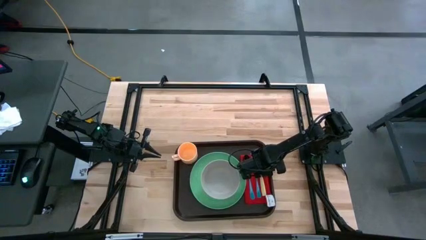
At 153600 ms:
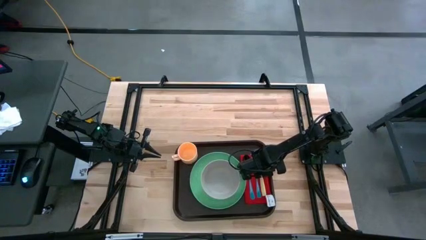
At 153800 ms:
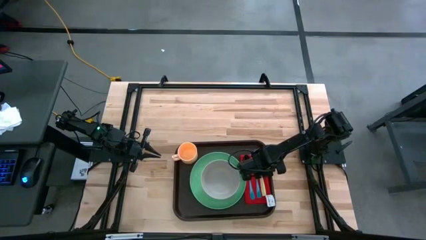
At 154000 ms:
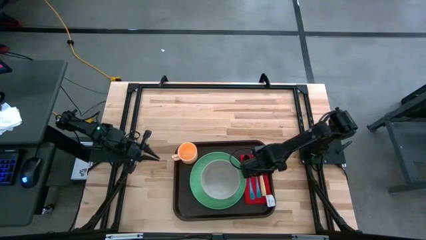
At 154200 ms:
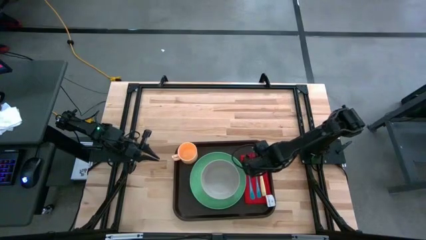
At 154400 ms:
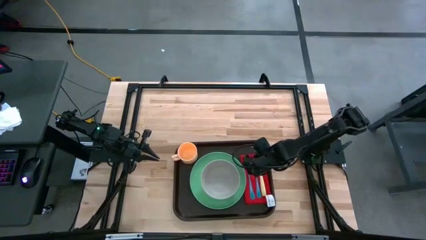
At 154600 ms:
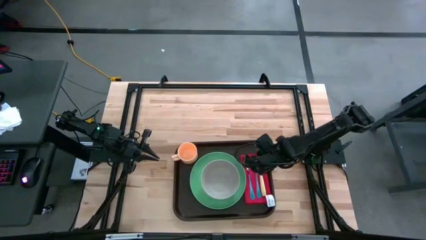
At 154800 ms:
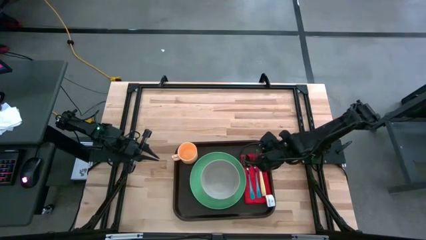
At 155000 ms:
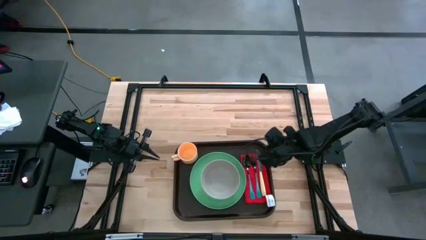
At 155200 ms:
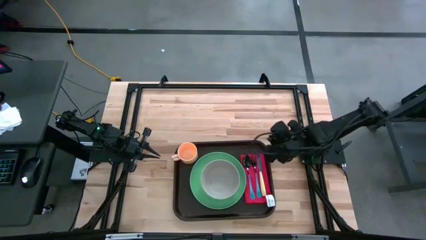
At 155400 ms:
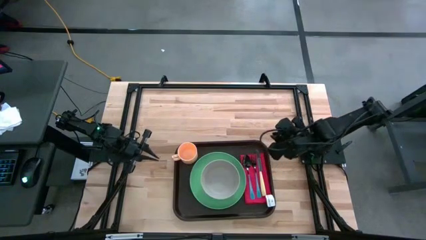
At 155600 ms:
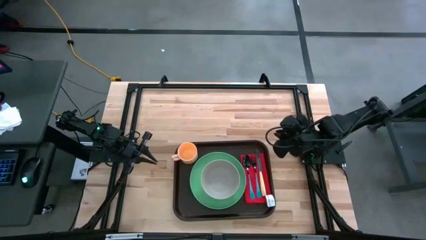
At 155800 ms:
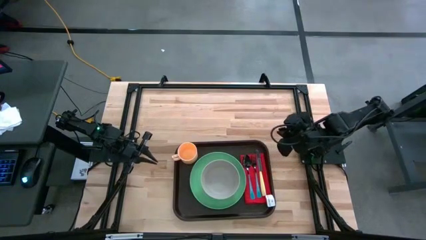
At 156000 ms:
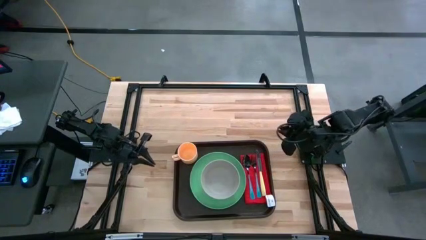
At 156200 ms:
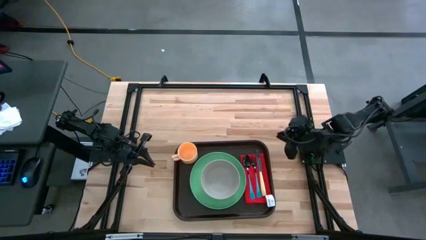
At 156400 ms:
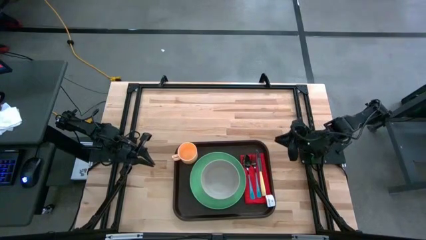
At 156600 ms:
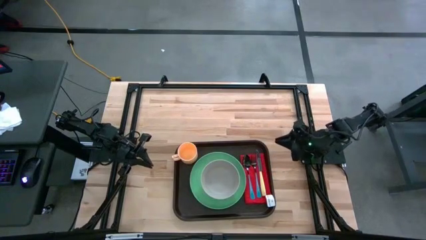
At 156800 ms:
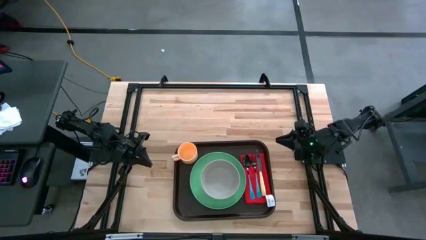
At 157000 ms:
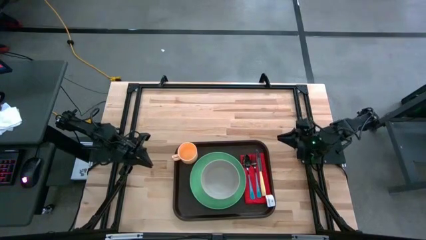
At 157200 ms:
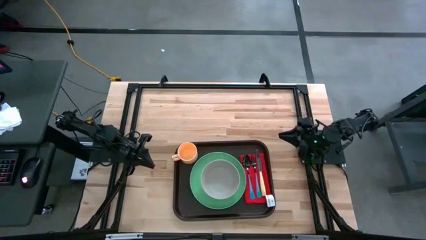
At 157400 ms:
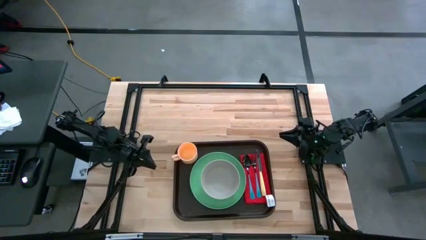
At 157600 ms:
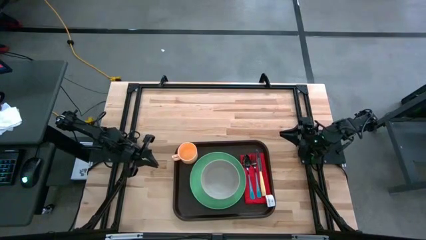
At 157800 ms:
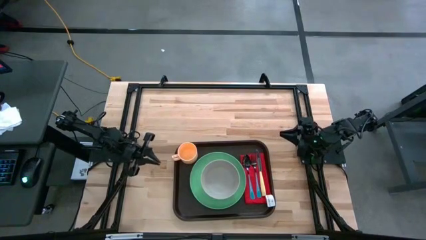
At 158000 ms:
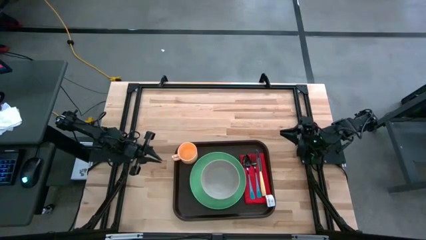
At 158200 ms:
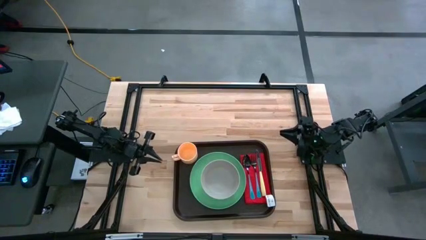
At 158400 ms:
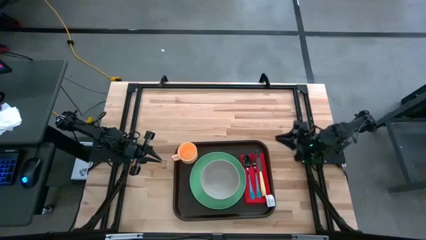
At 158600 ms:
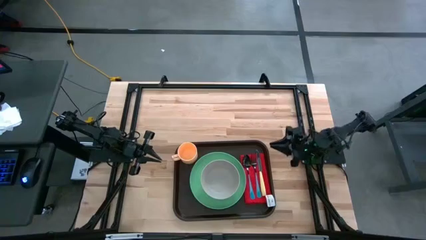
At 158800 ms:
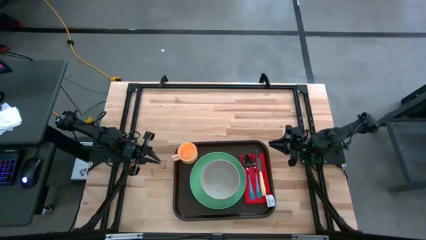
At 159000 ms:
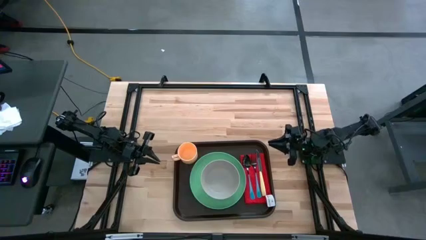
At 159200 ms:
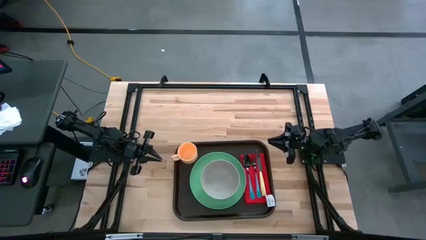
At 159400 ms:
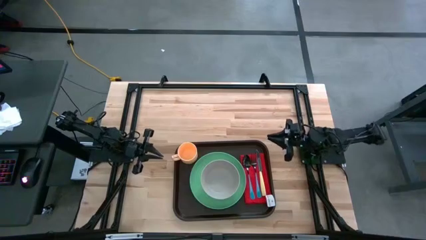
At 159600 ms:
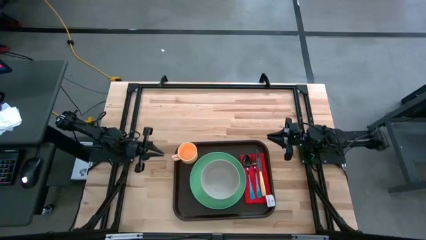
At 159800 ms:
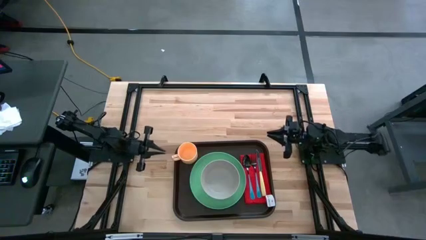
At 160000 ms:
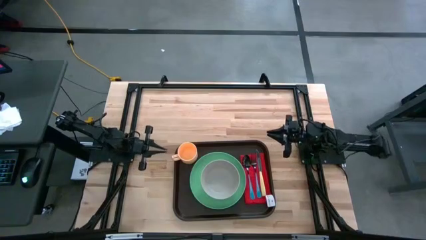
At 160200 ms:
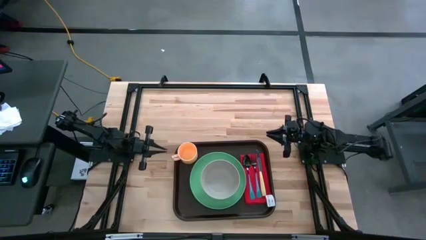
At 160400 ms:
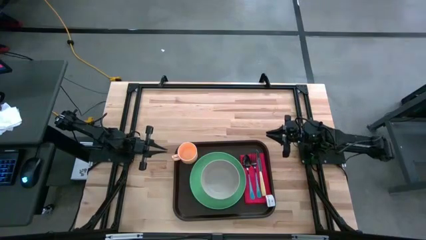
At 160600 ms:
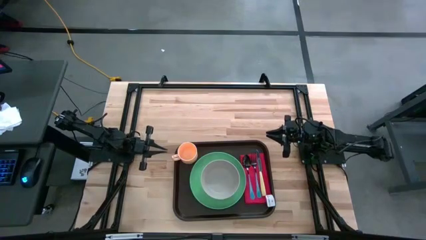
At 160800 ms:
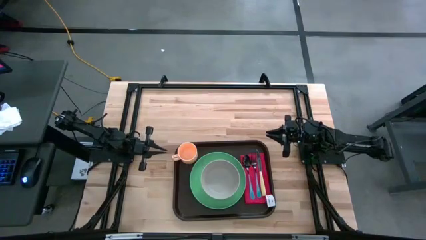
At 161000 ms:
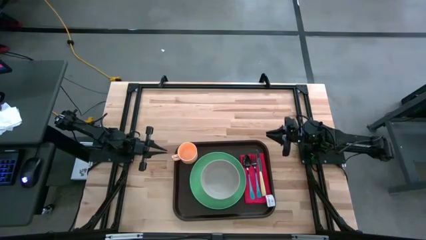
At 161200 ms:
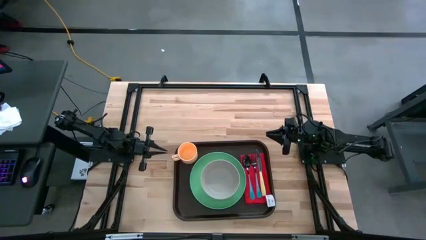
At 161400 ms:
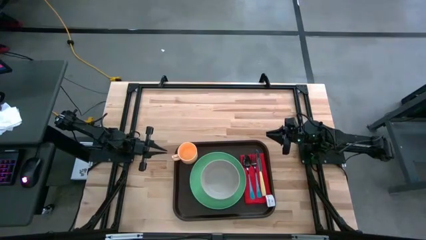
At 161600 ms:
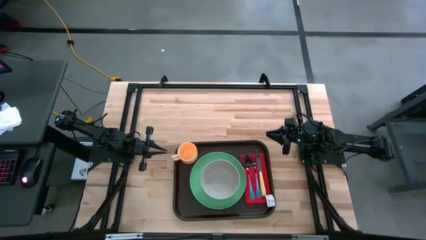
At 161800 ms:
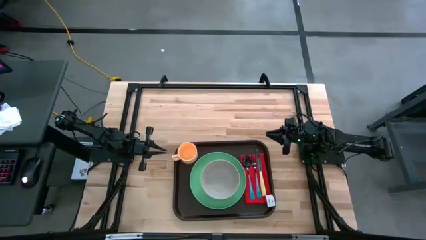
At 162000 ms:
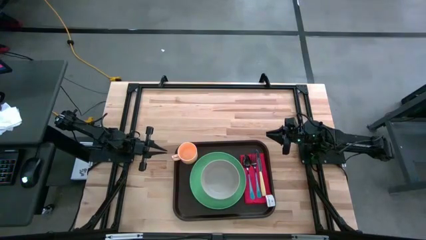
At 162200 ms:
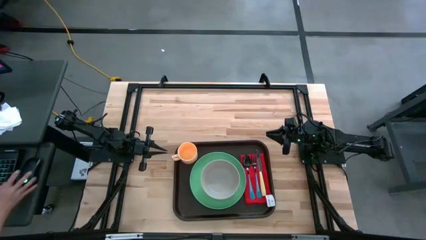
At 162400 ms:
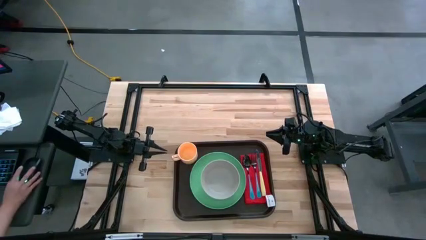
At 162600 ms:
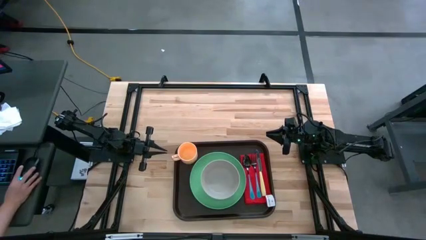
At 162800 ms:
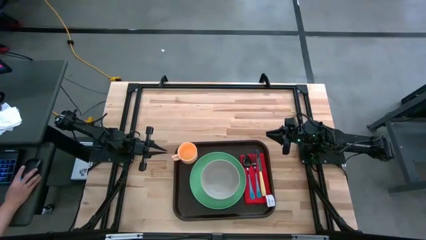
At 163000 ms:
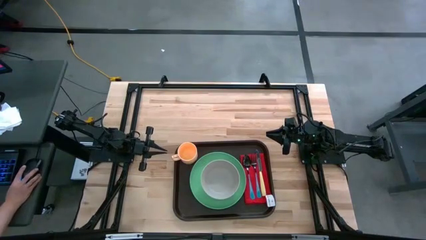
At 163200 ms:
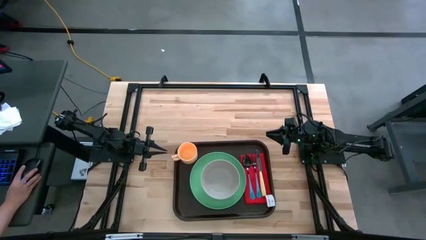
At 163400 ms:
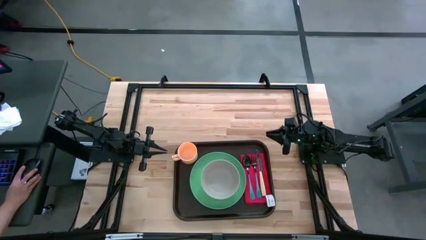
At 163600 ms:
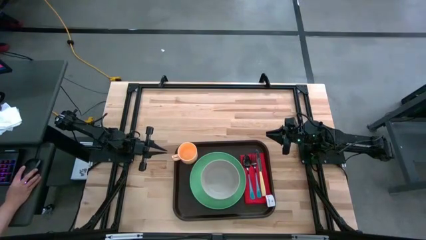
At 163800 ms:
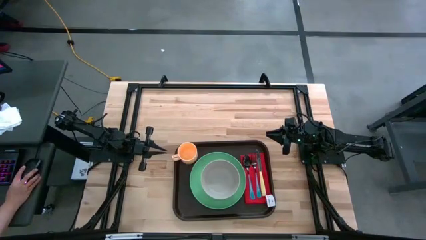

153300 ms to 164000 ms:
Task: Set up tray
Return to Home Position

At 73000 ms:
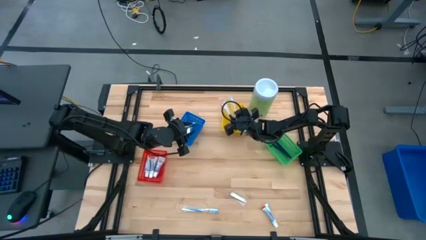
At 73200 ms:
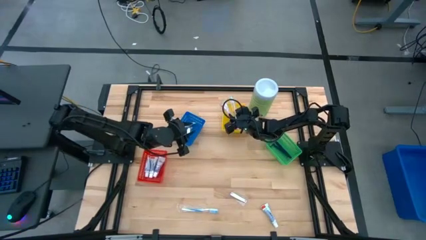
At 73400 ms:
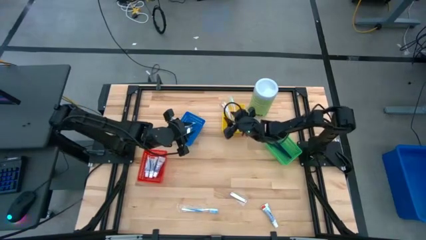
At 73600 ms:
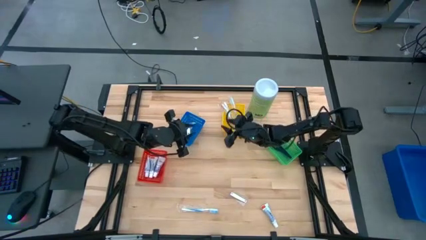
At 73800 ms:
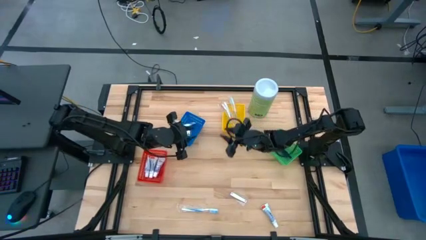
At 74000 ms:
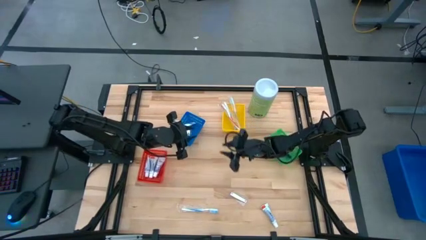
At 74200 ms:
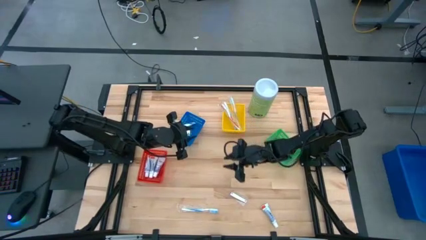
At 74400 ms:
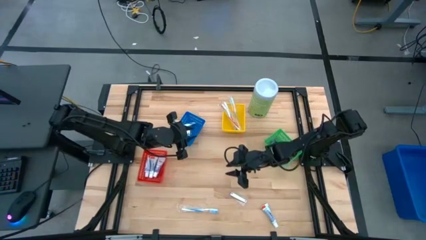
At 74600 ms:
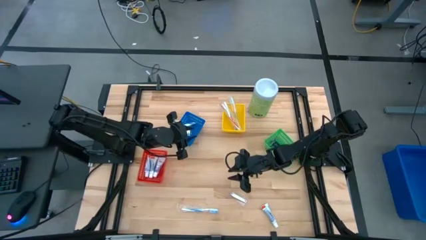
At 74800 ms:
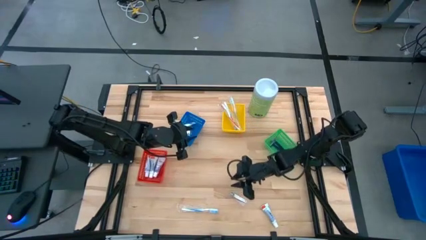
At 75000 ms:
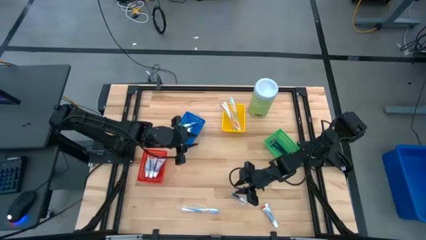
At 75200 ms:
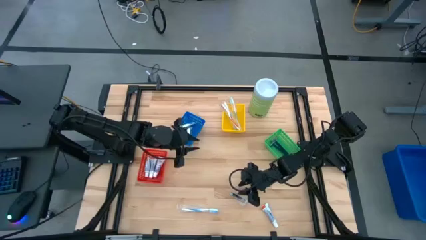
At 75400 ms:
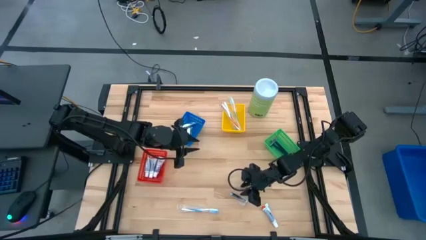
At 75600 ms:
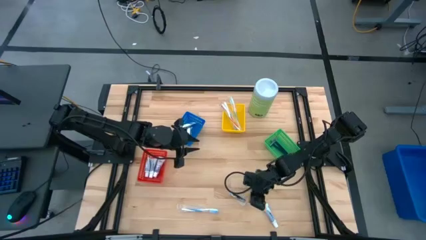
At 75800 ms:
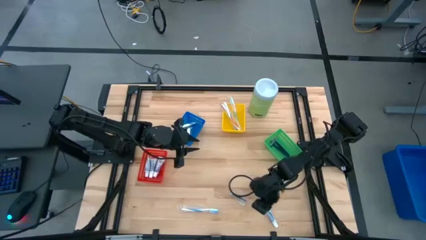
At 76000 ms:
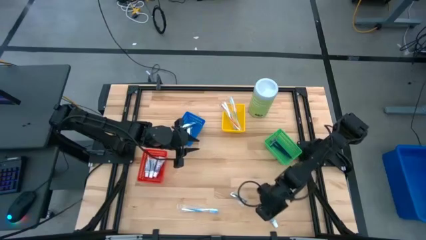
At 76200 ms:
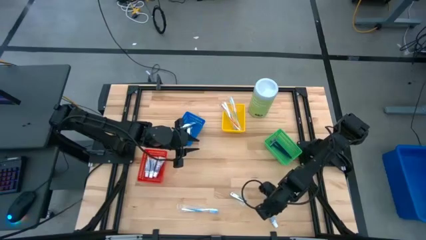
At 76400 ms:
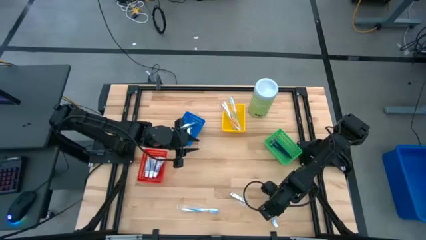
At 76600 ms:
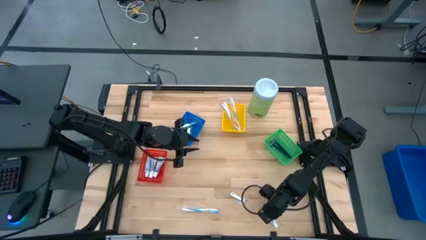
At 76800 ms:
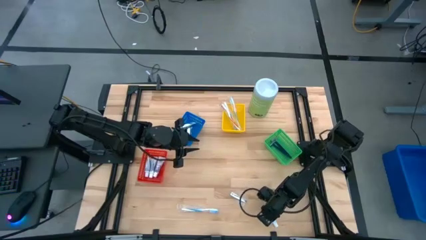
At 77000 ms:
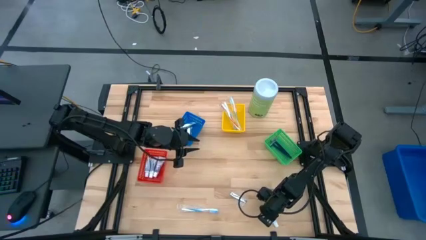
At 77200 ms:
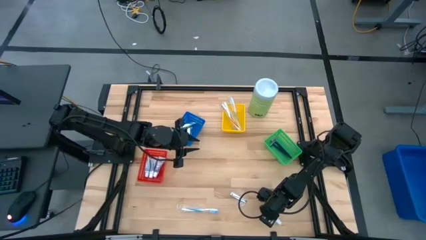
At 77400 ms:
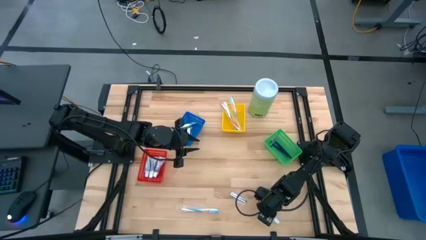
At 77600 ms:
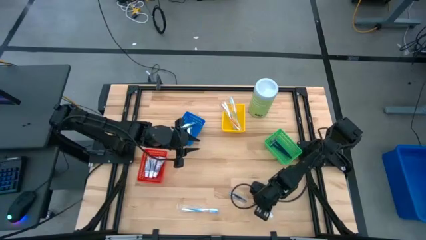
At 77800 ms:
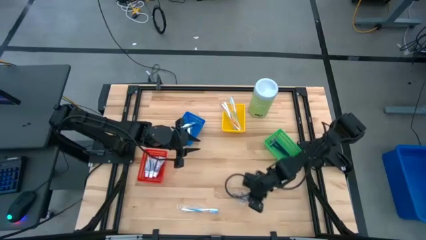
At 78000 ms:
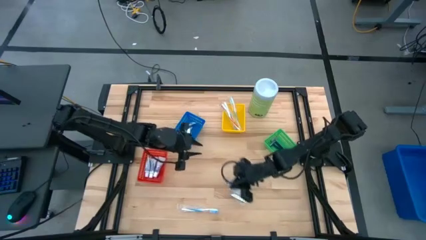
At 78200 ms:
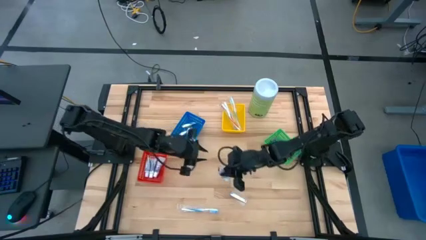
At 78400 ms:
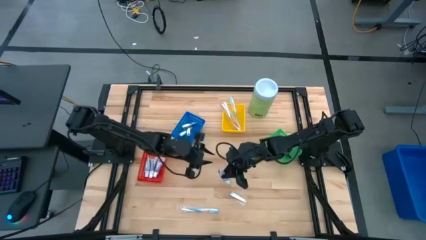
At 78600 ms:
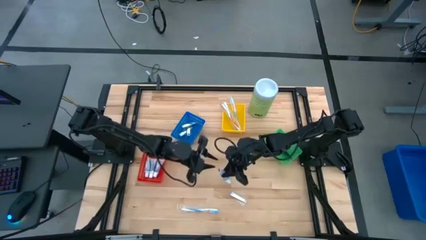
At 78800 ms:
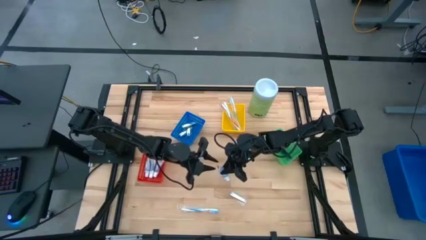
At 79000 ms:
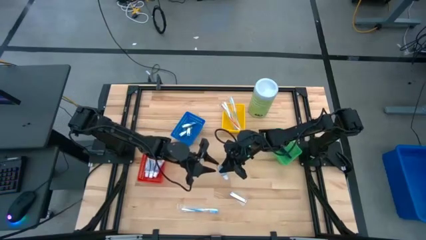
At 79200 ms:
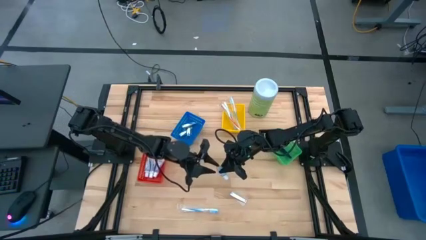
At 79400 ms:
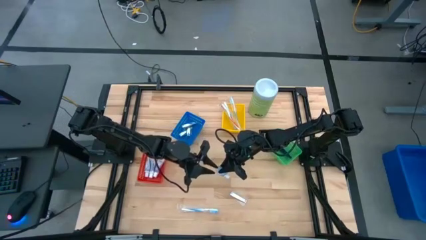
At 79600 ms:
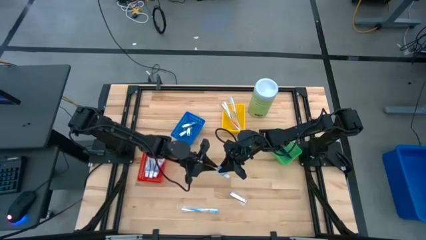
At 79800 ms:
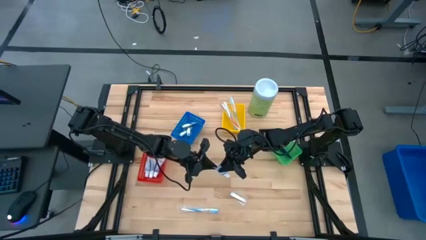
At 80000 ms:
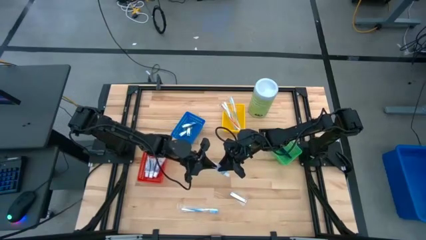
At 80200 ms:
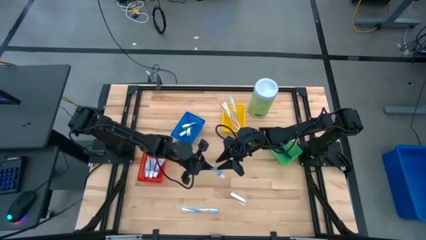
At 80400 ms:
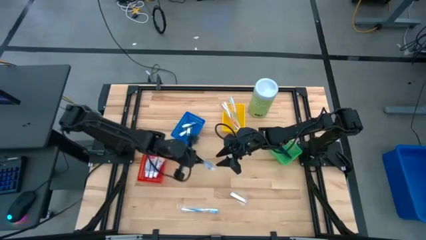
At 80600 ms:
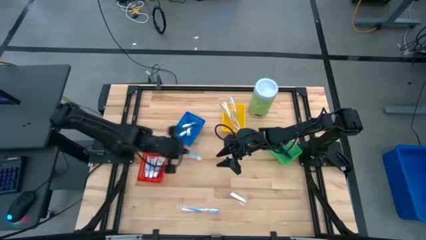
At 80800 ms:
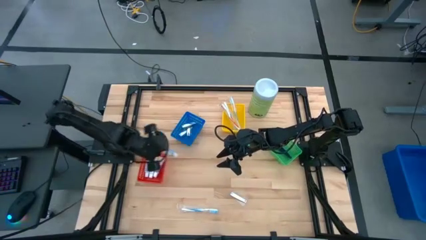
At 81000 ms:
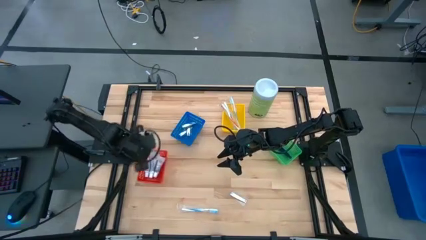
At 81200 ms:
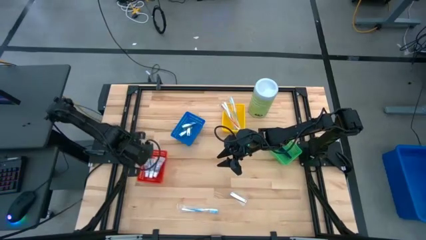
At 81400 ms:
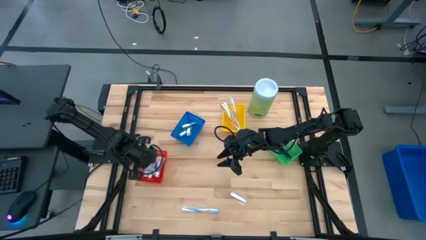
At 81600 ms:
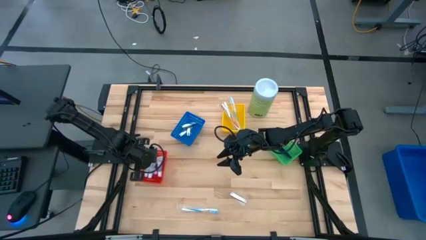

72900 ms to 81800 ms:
Task: Pick & Place Travel size toiletries
Put the white toothpaste into the red basket
